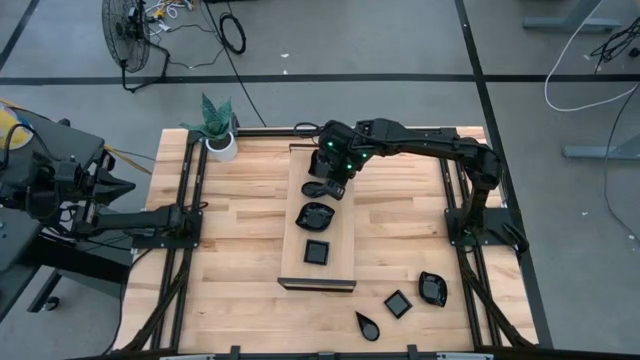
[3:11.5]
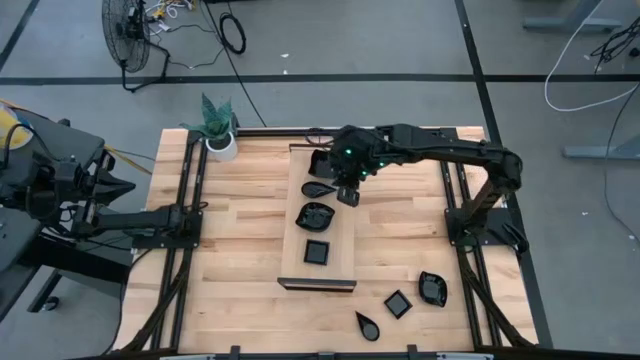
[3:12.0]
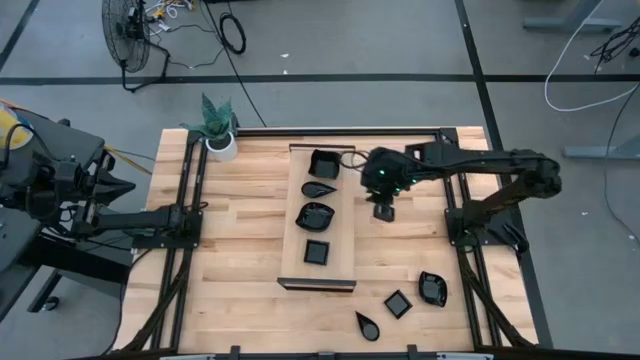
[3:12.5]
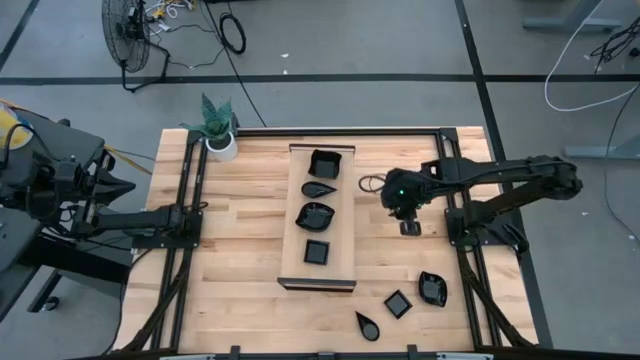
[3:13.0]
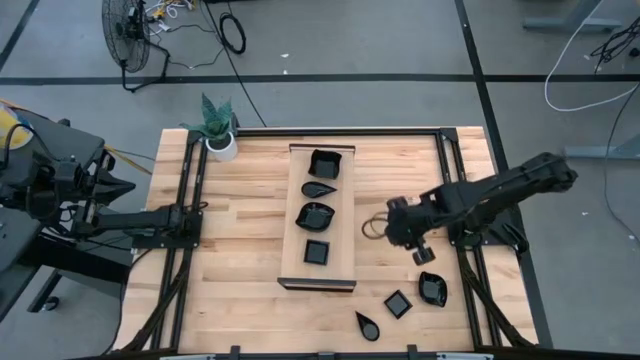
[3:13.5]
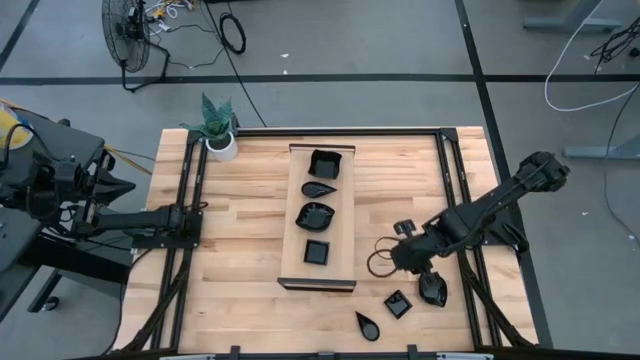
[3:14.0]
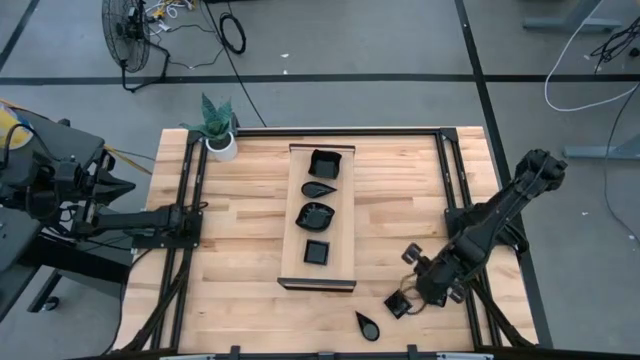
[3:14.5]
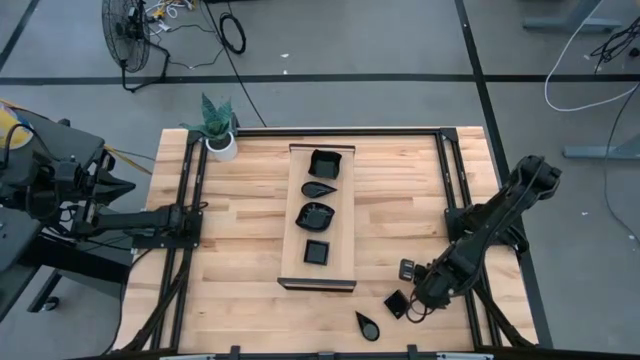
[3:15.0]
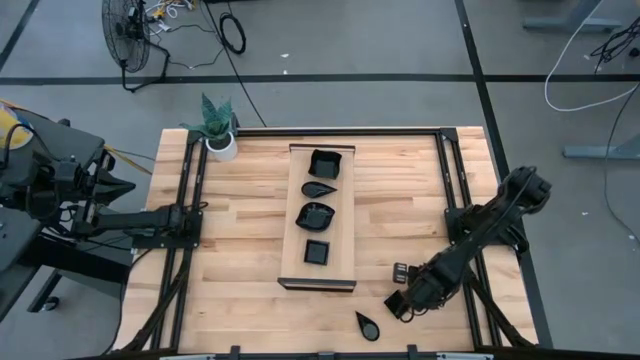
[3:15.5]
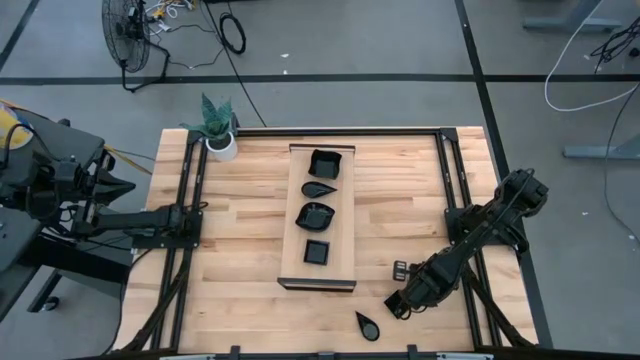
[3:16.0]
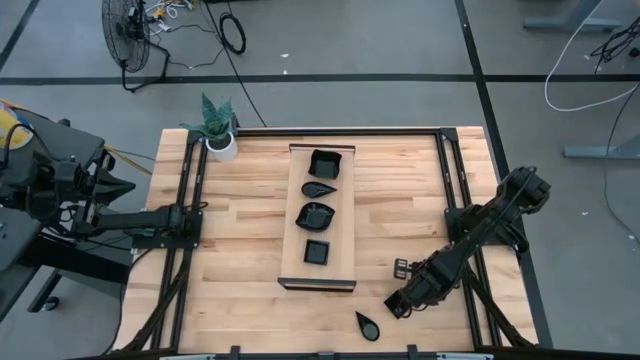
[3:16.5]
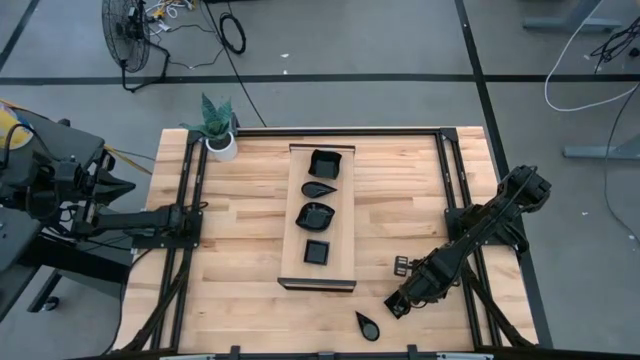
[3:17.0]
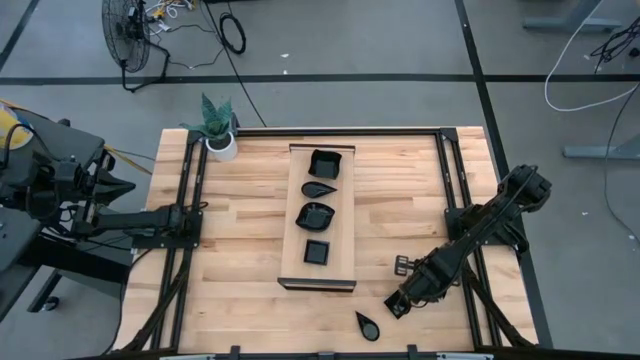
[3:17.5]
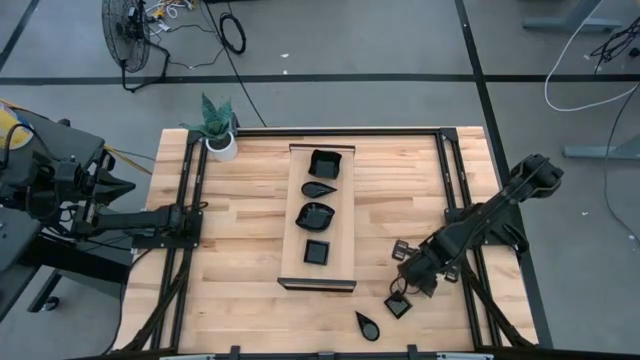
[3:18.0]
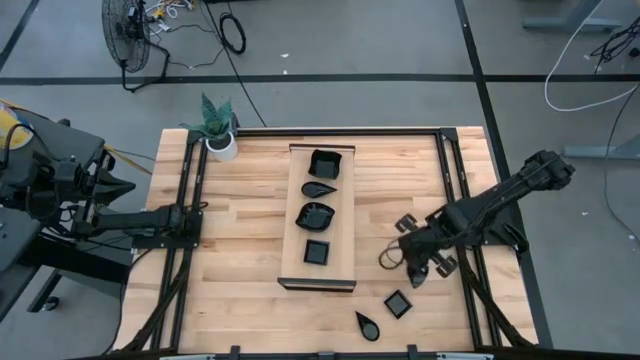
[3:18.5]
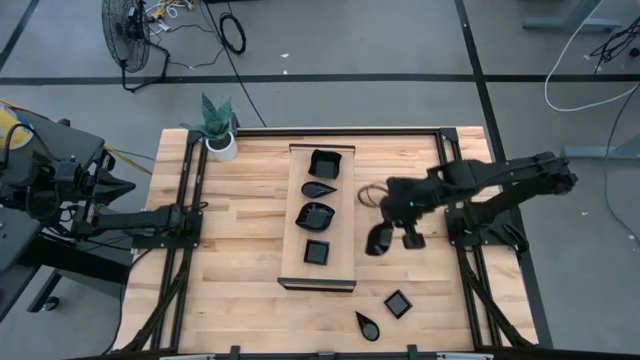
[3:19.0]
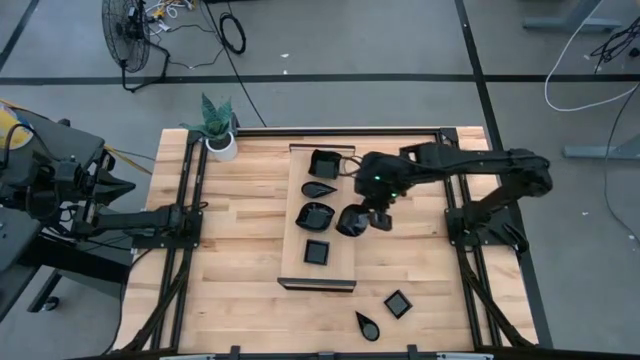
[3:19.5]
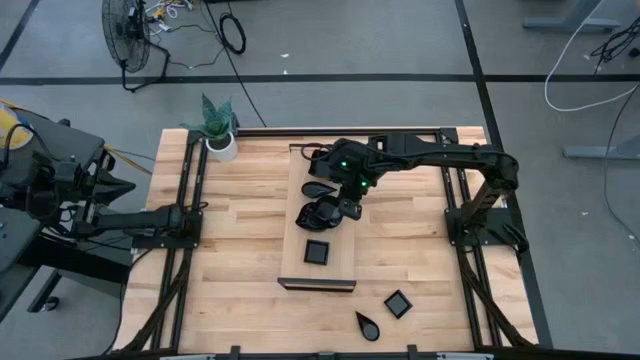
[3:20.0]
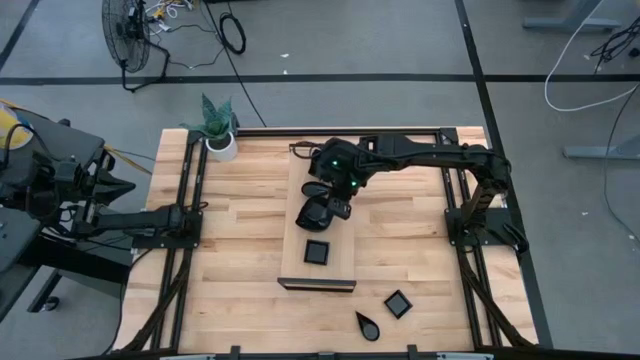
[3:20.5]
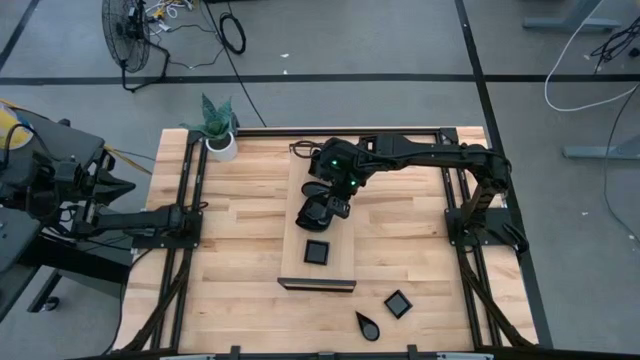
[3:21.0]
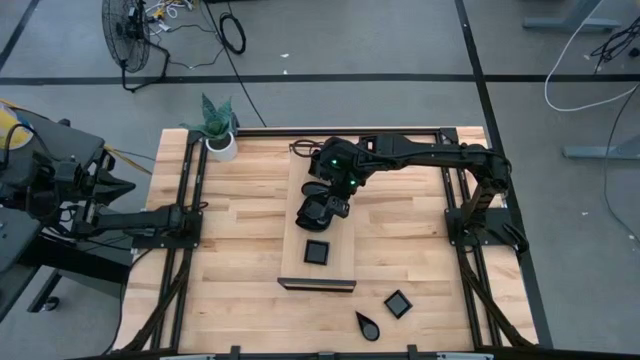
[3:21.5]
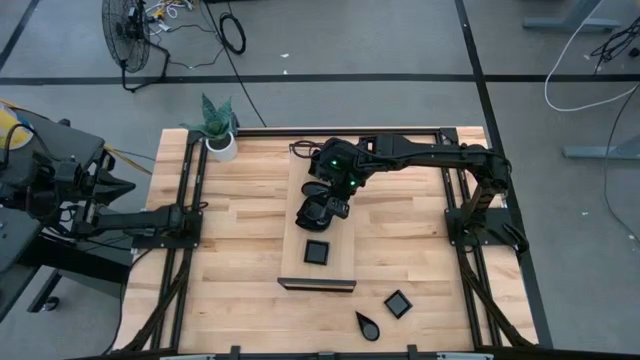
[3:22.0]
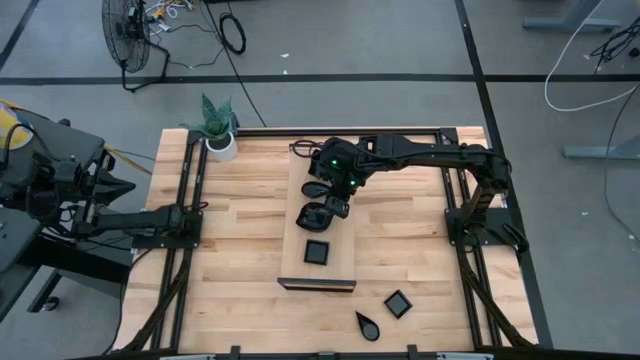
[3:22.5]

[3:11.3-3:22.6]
Task: Pick & Place Mini shaped plates
Stack the leaf shaped plate on top of the leaf shaped plate on the shelf

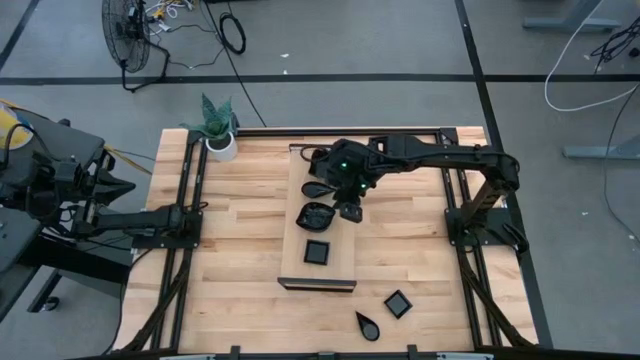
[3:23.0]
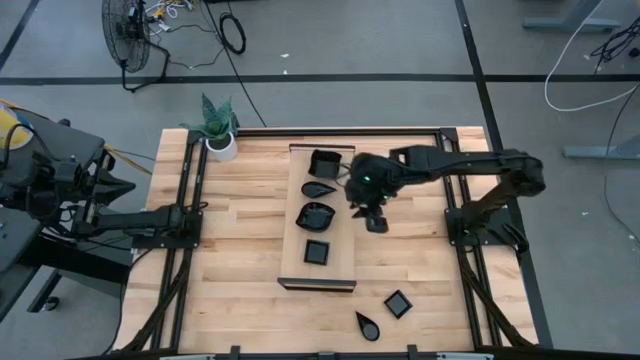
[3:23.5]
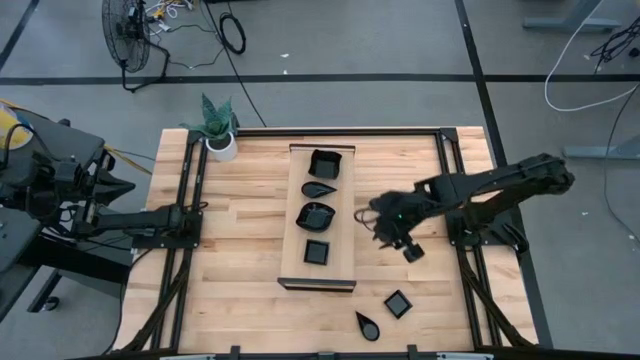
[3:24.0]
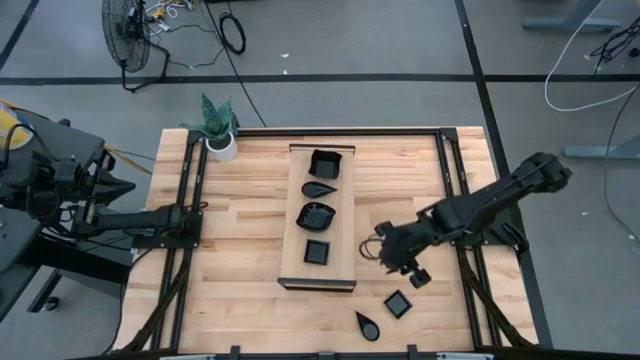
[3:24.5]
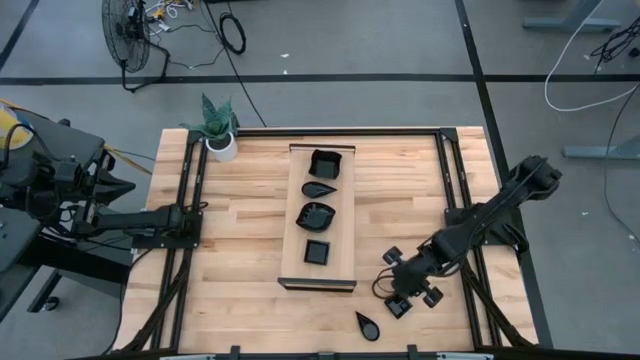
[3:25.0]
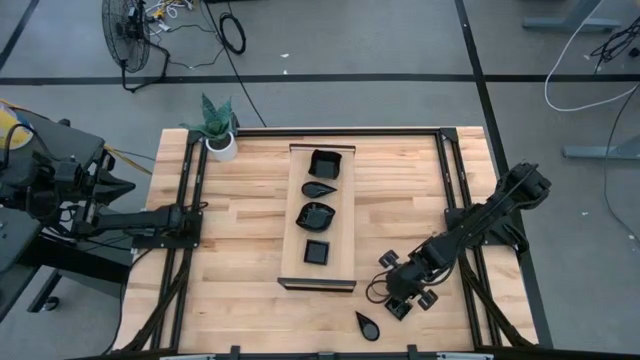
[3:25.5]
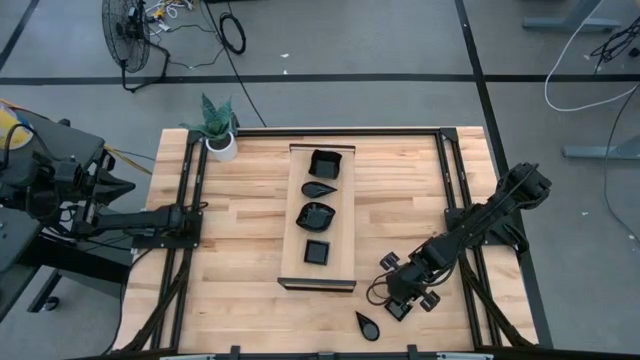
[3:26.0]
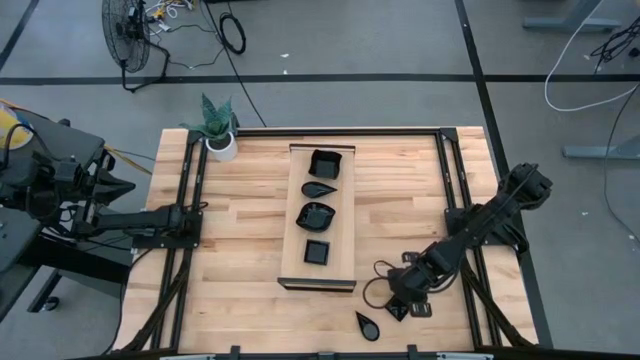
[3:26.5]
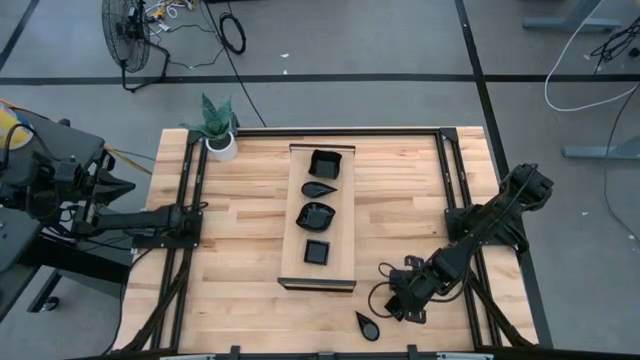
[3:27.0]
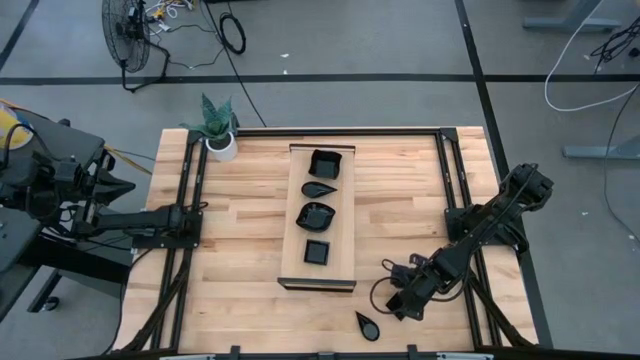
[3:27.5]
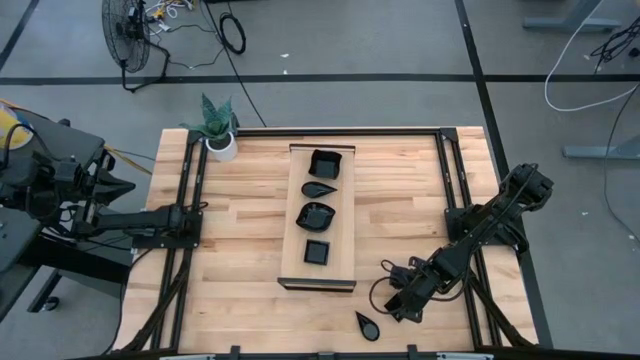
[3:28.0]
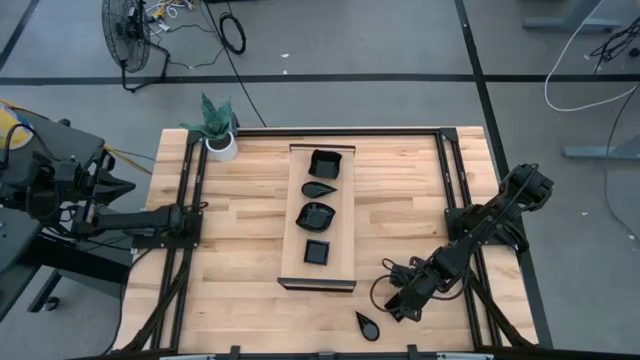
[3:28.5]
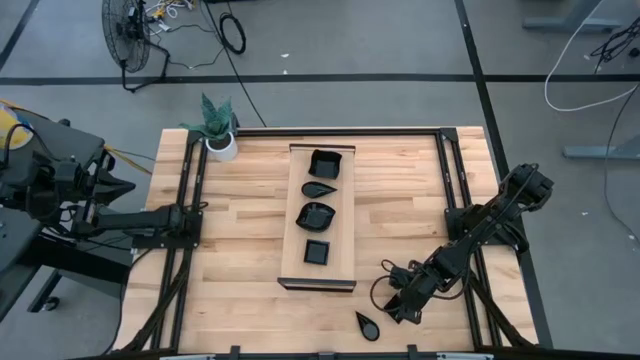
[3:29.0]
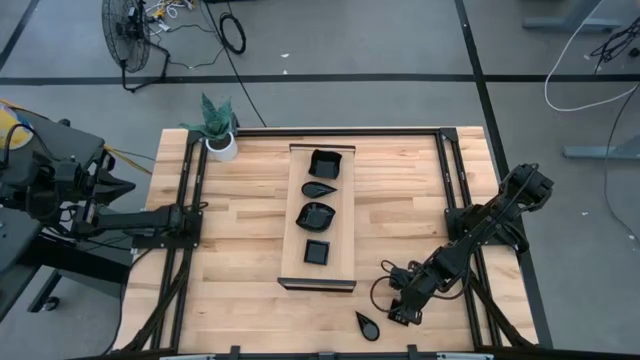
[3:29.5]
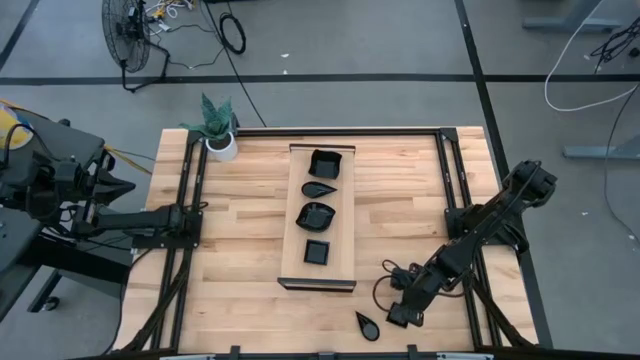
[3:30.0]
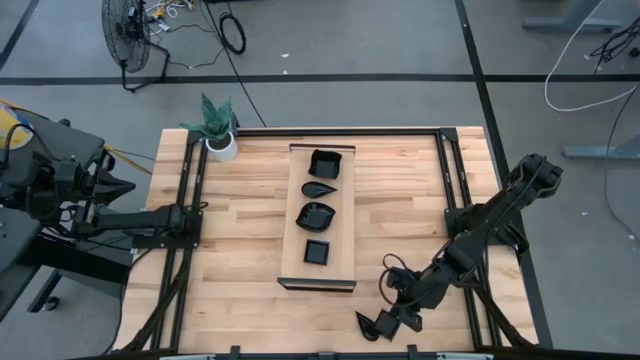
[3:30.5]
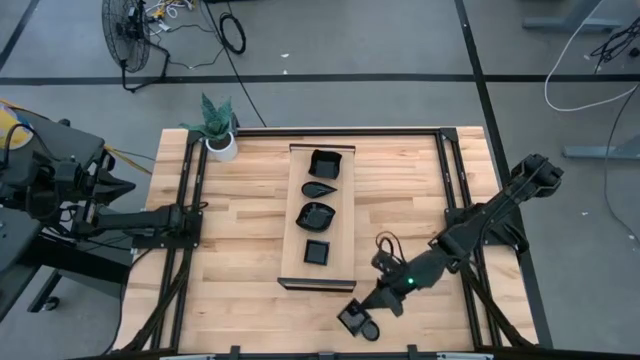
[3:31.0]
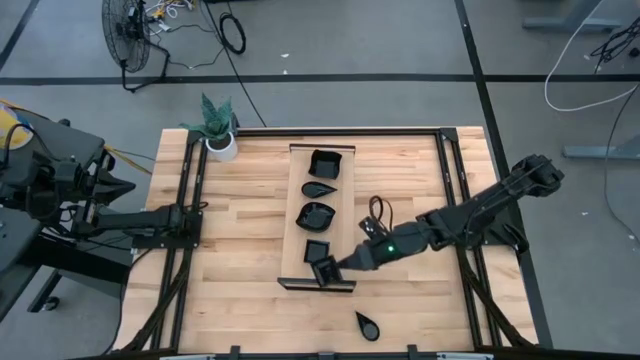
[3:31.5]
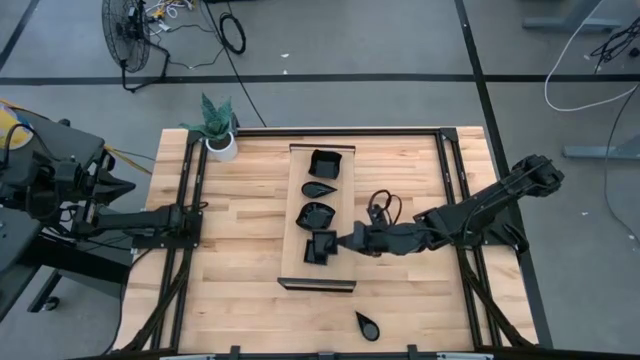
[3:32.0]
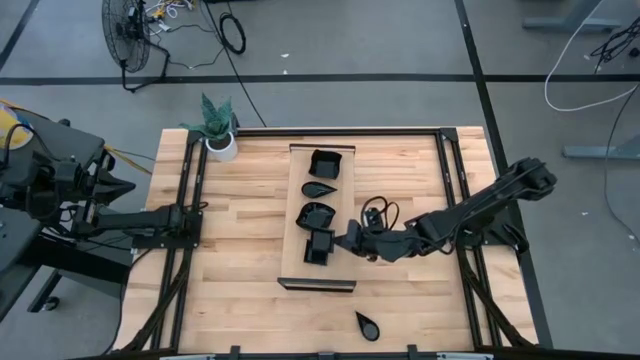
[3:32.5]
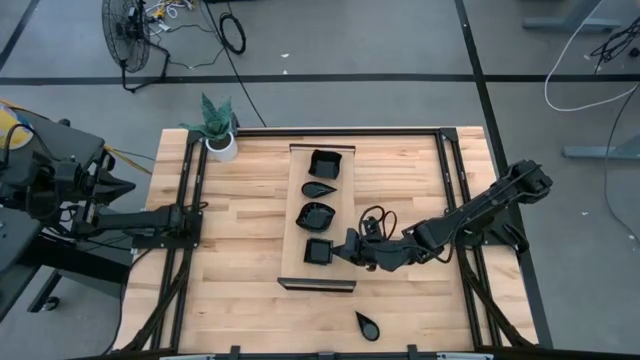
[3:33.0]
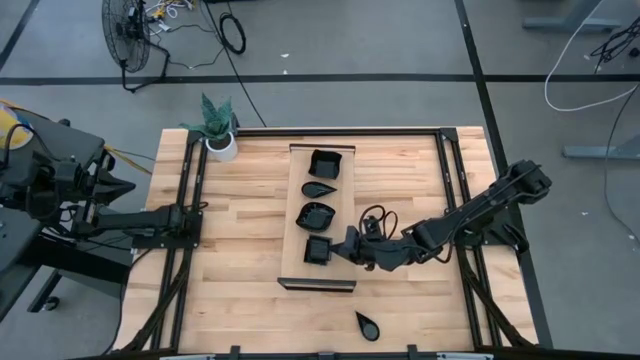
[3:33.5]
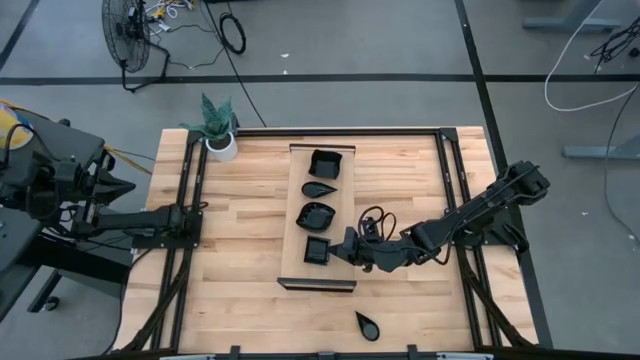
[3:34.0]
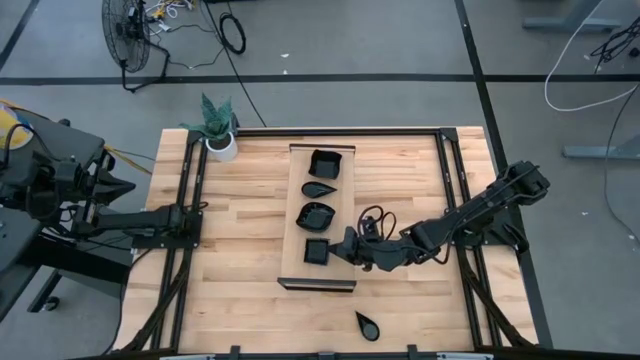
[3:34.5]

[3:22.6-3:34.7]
Stack the square plate on top of the square plate on the shelf
